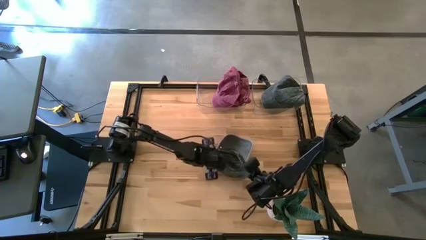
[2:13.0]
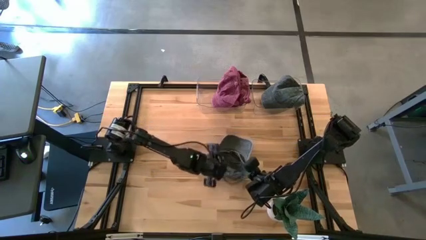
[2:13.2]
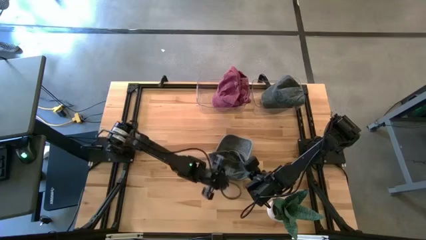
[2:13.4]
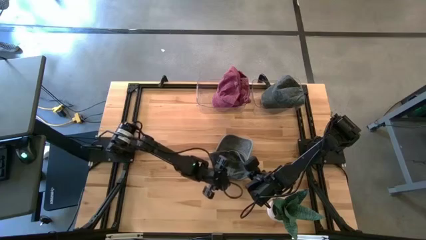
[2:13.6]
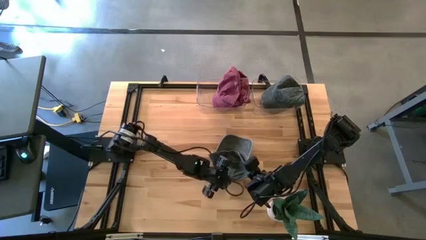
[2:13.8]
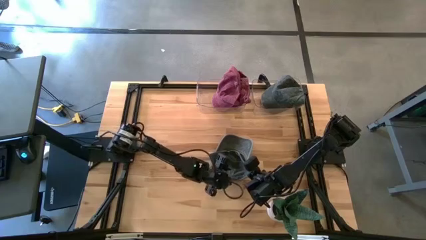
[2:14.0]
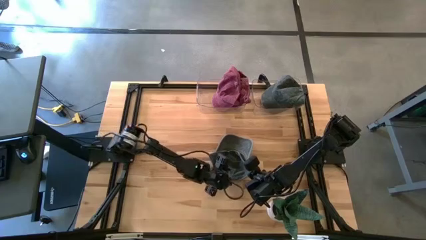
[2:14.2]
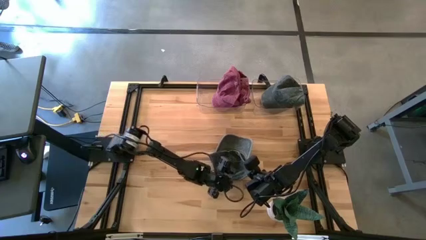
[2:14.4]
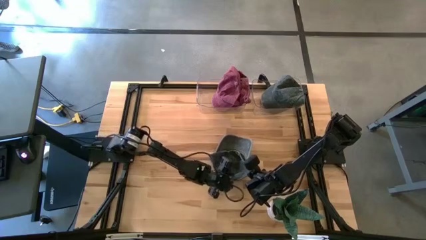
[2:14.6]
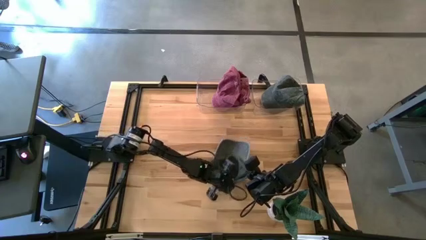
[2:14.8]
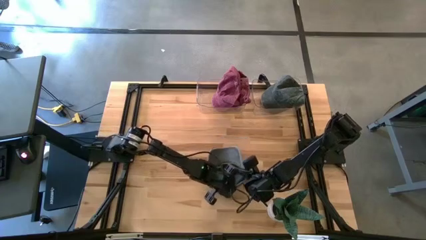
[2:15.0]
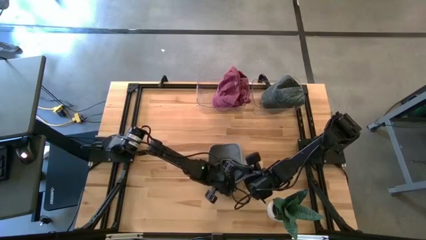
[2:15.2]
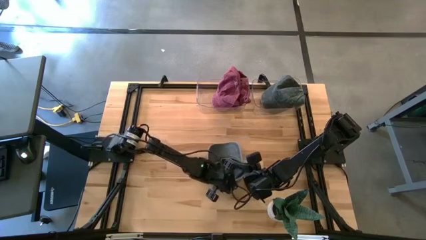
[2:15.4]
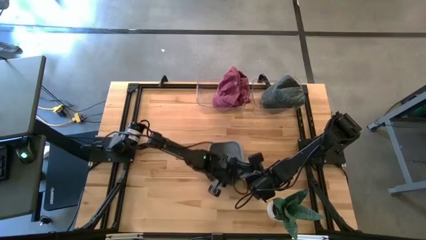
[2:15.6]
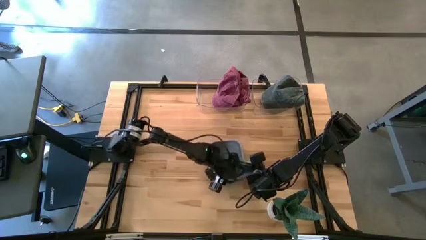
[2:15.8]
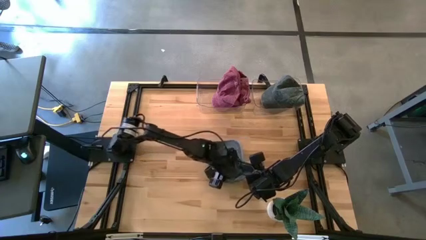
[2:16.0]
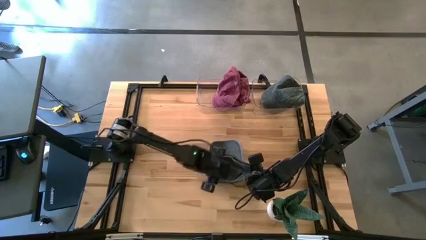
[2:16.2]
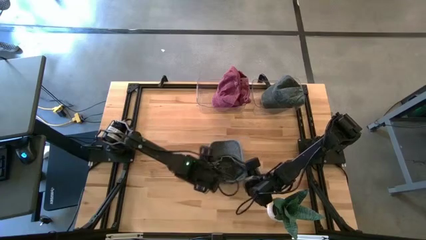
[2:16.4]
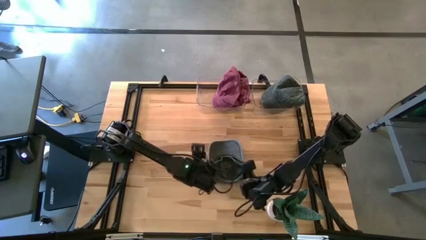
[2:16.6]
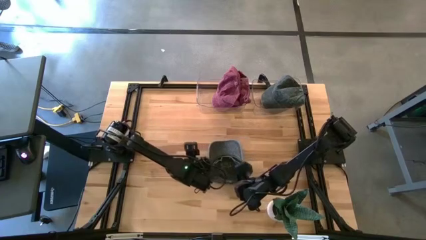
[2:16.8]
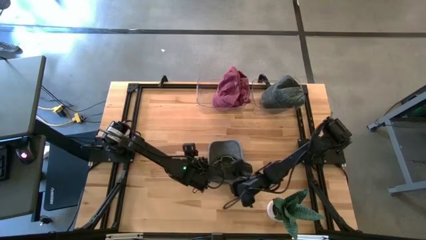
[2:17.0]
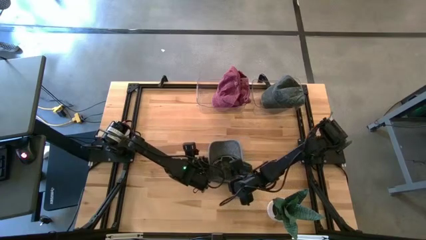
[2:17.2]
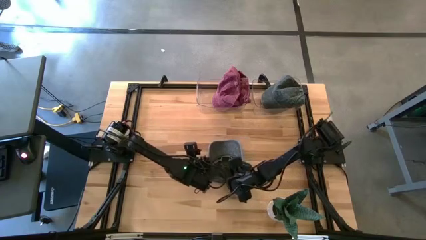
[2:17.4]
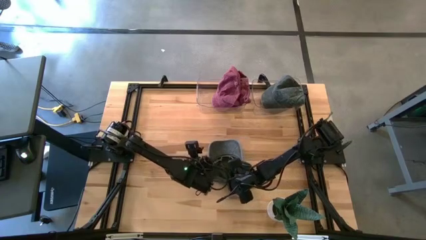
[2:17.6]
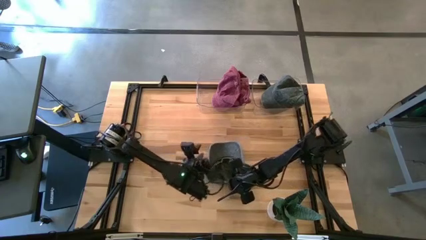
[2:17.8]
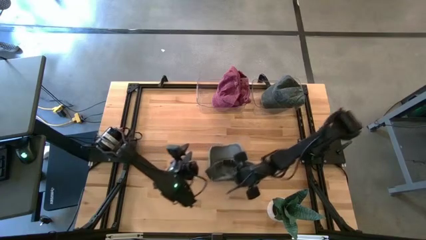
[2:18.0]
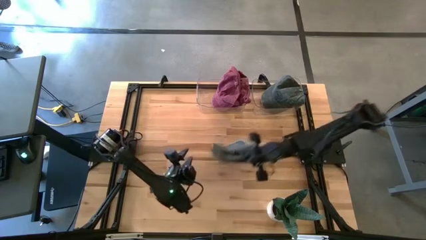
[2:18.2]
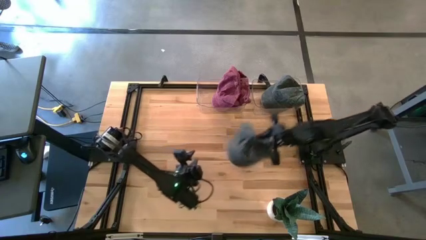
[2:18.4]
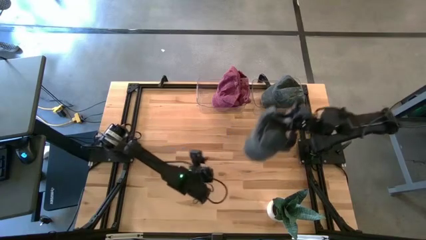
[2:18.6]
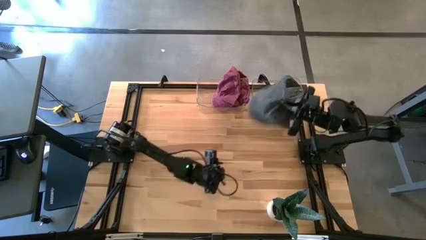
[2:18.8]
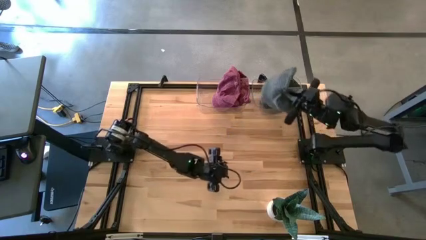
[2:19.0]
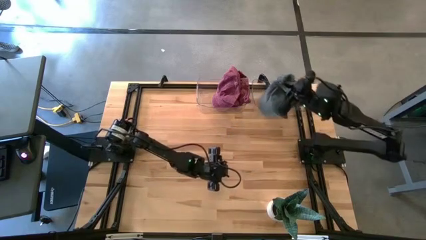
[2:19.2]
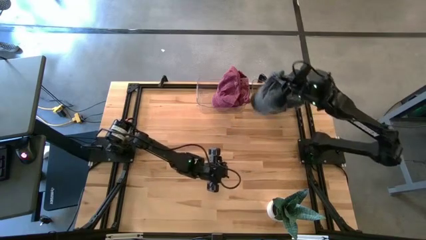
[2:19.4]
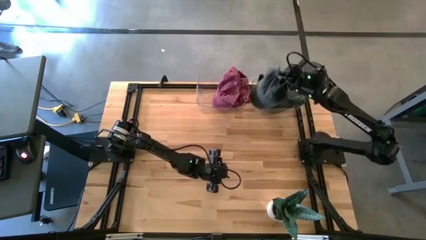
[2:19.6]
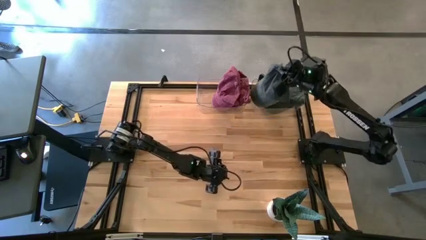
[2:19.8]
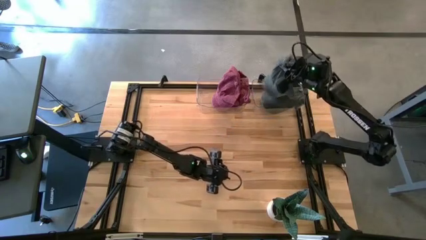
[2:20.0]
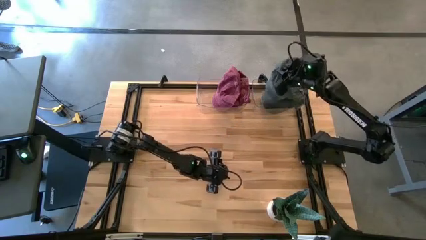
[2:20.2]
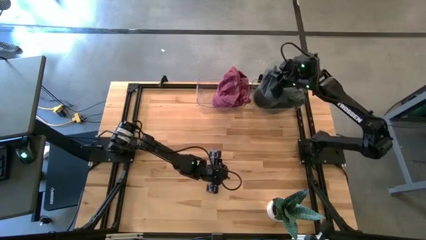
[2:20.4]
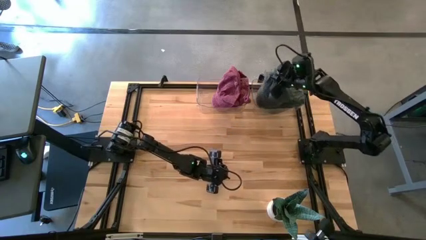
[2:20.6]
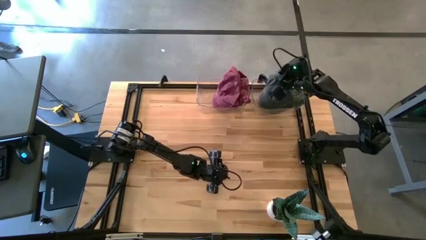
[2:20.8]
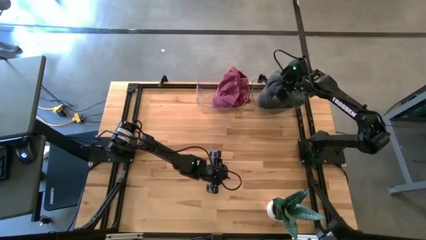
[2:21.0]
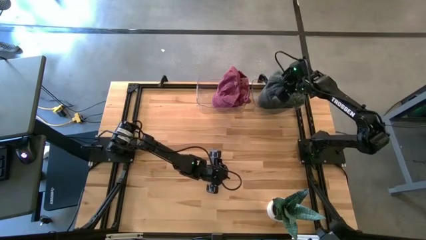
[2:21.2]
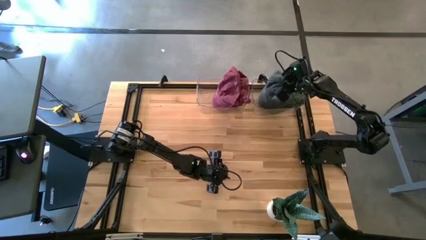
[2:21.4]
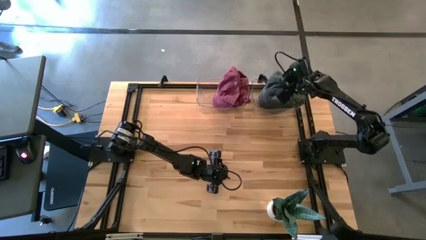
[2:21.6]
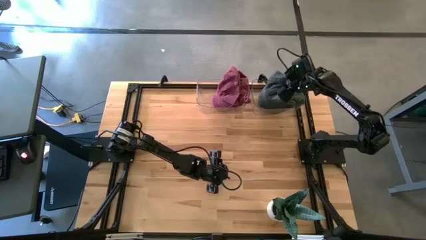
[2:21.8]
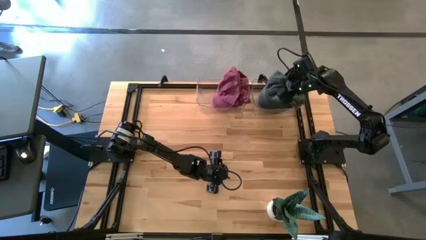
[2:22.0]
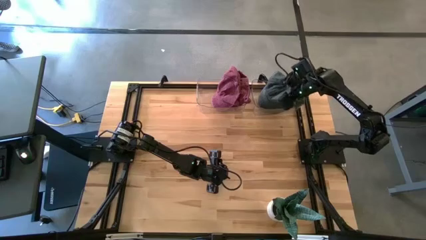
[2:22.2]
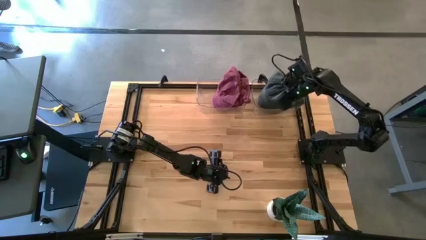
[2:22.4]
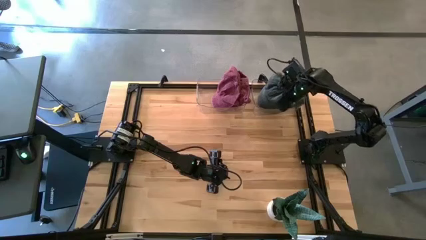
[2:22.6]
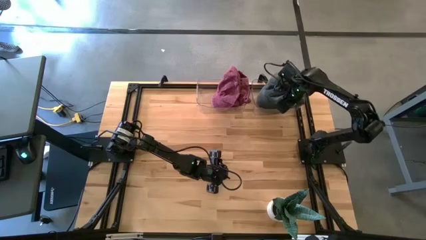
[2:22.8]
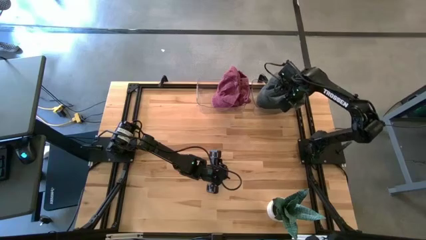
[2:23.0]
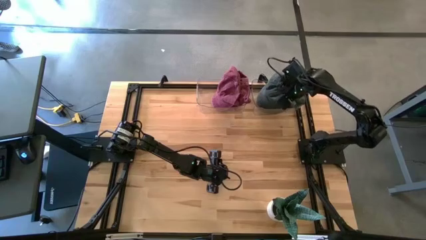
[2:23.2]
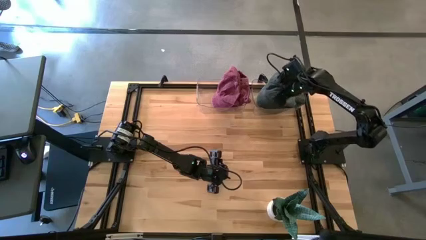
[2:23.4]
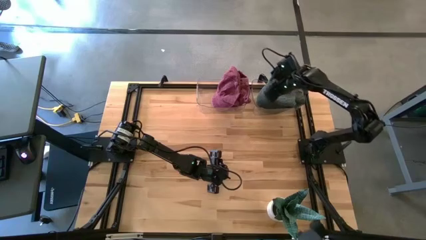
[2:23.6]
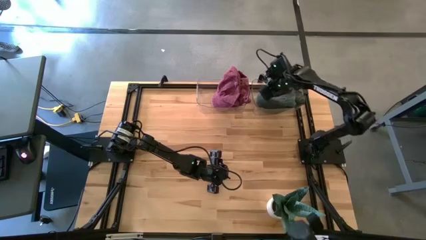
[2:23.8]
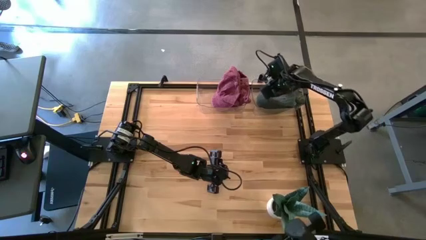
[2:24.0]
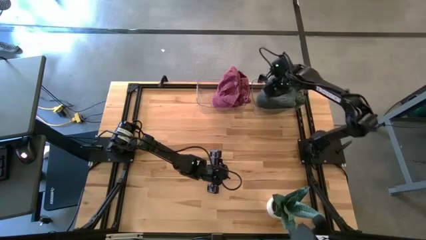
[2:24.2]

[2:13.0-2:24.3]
Task: Pick & Place hat
Put the black cap into the right transparent bin
